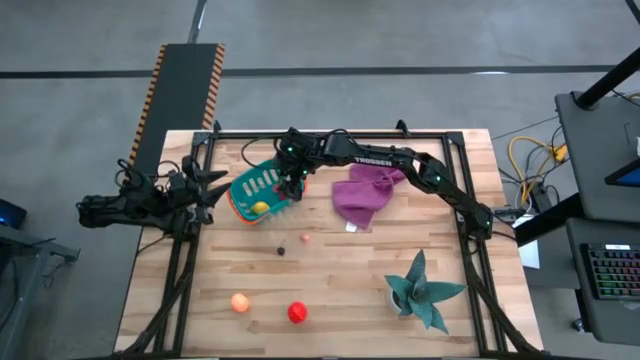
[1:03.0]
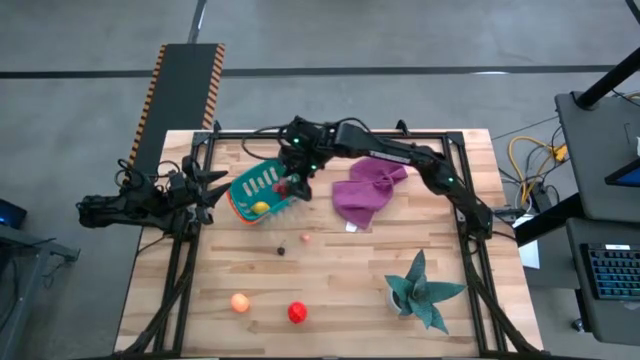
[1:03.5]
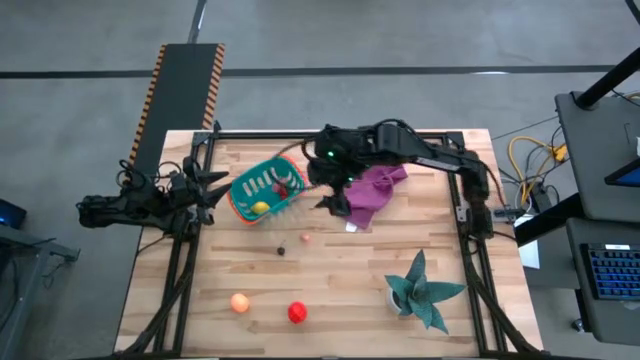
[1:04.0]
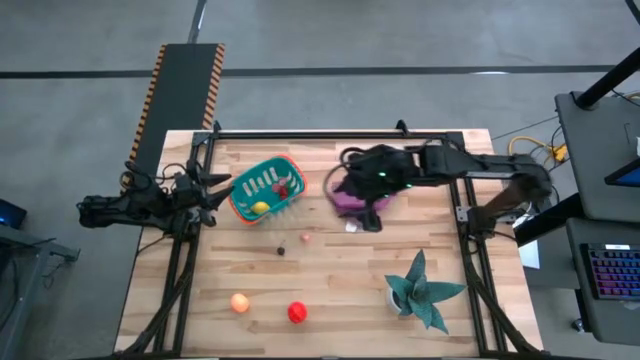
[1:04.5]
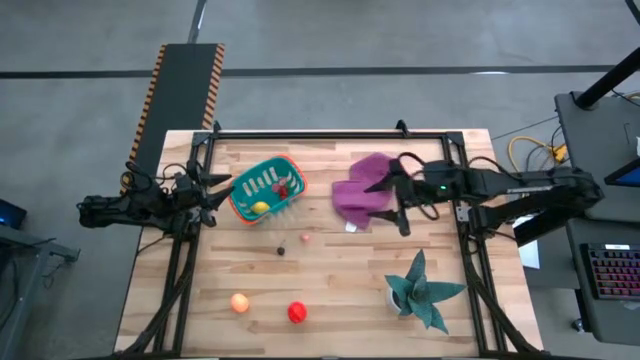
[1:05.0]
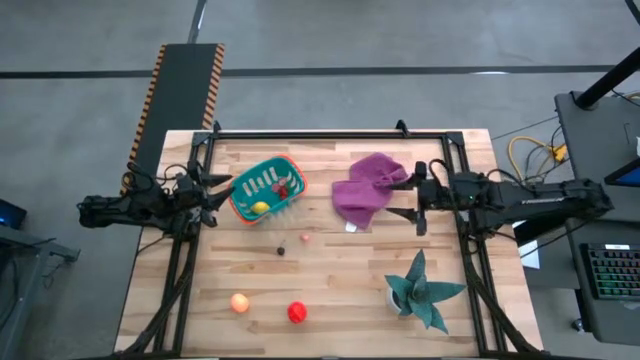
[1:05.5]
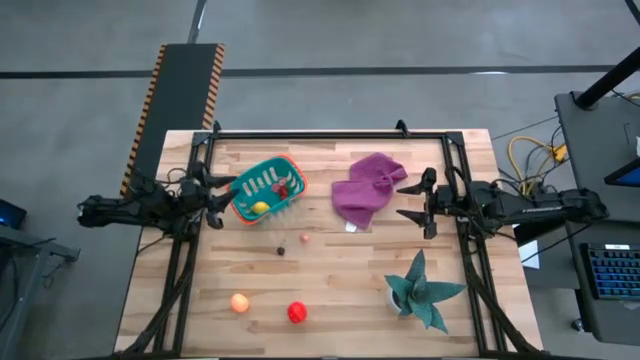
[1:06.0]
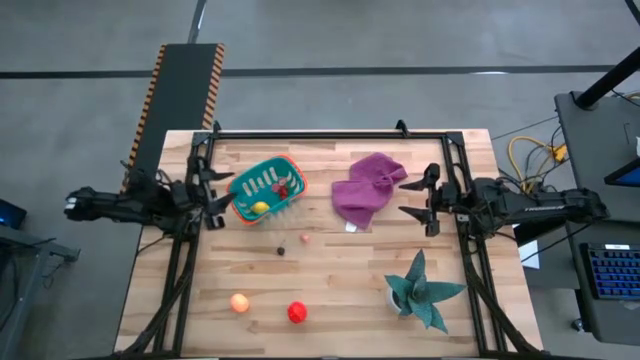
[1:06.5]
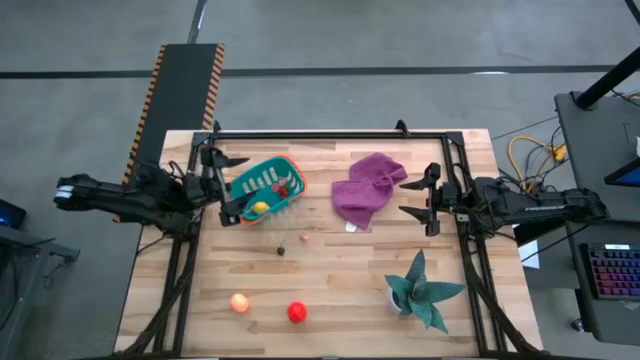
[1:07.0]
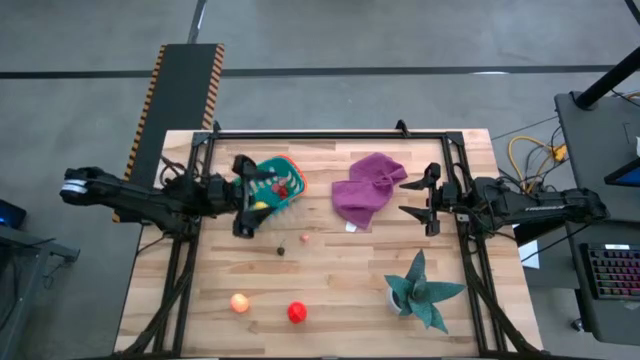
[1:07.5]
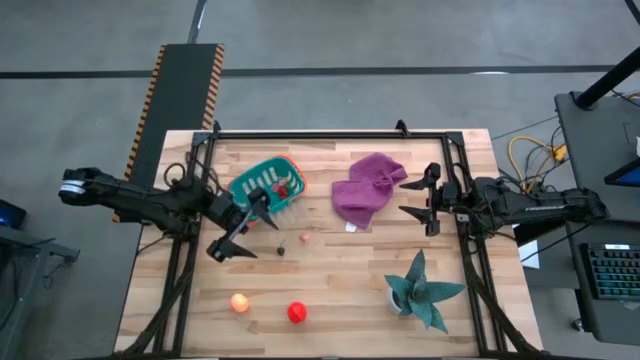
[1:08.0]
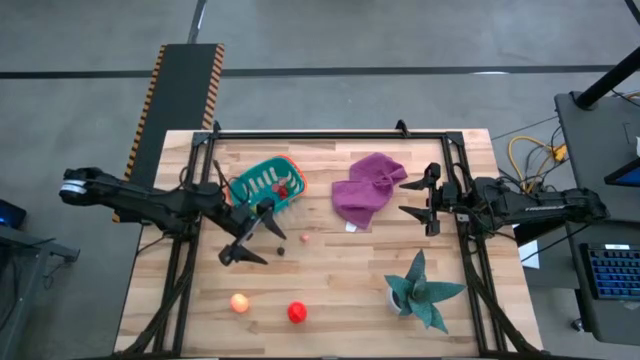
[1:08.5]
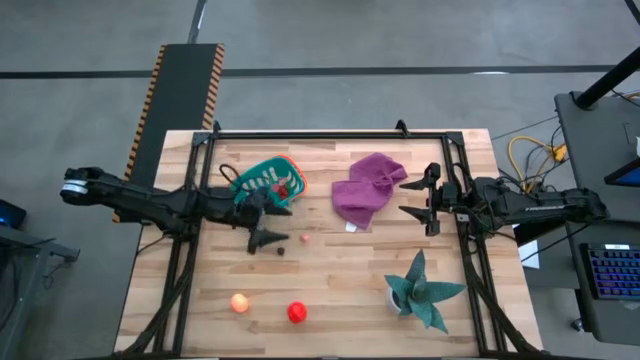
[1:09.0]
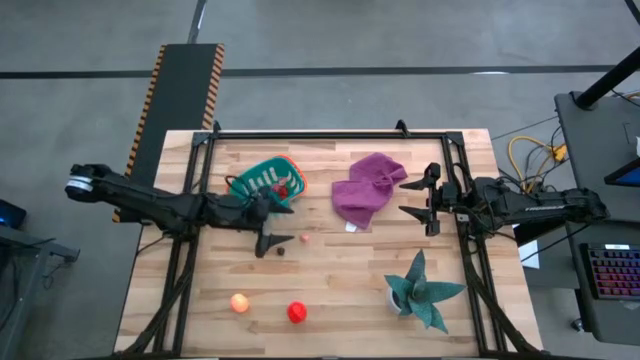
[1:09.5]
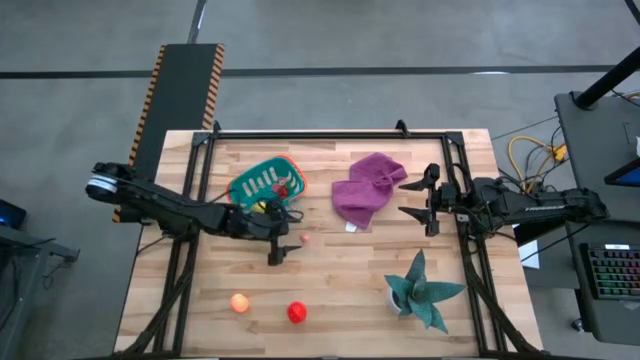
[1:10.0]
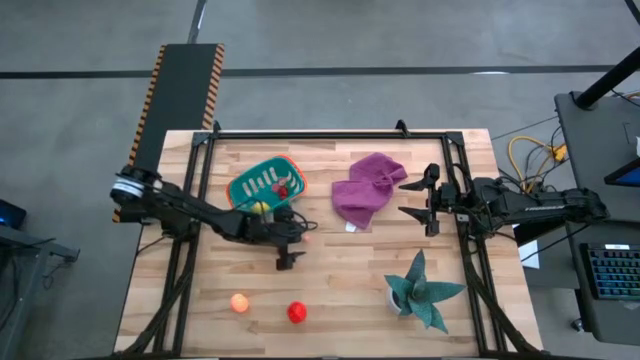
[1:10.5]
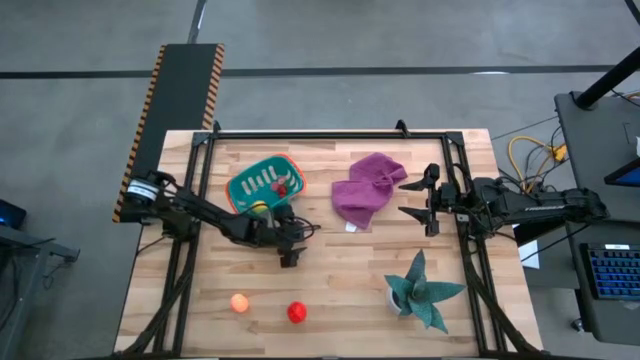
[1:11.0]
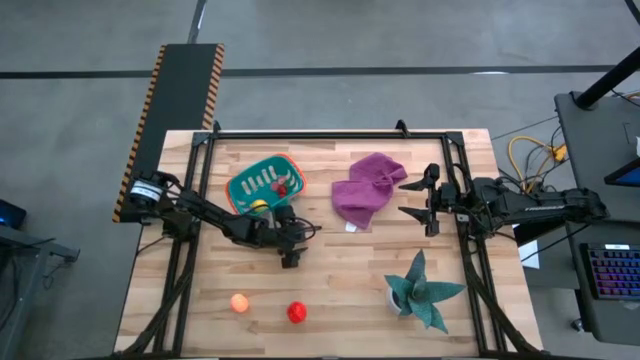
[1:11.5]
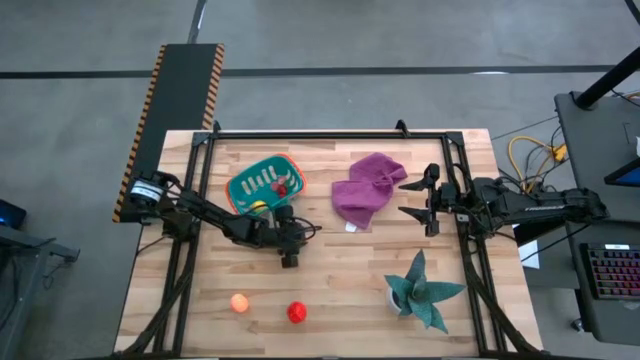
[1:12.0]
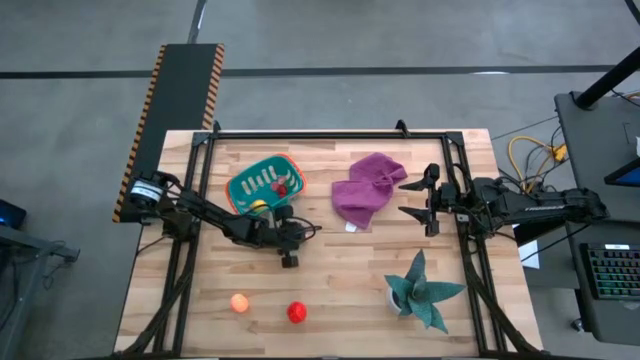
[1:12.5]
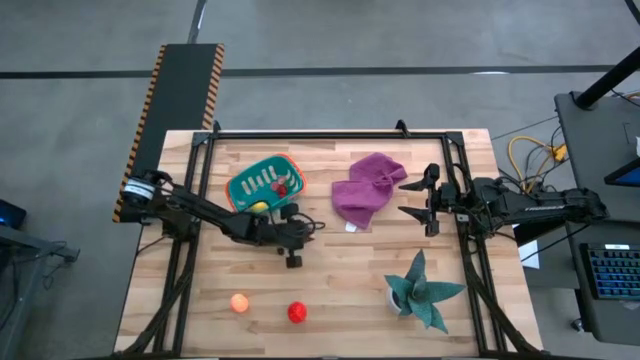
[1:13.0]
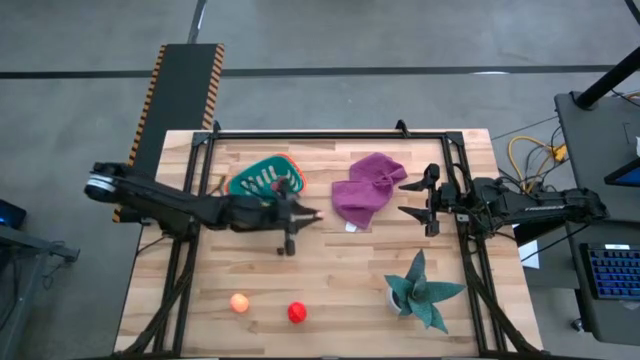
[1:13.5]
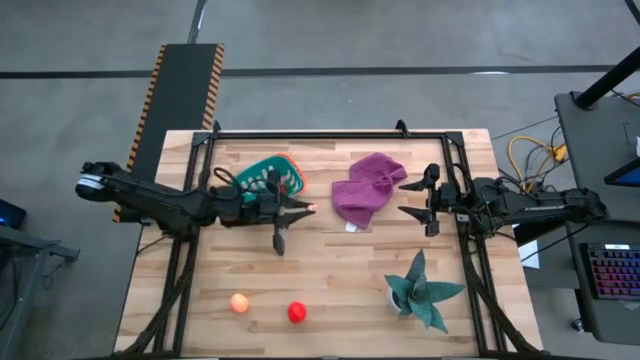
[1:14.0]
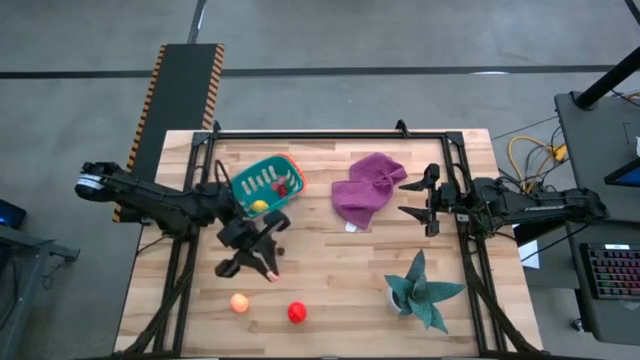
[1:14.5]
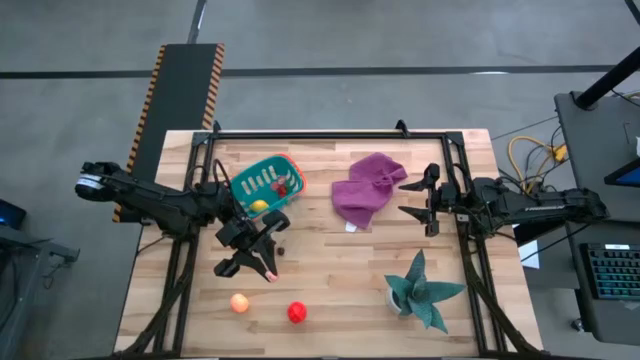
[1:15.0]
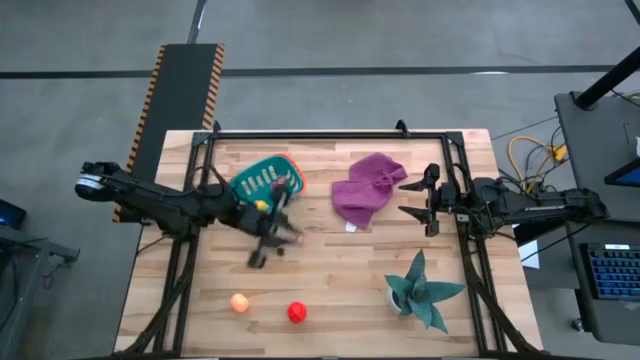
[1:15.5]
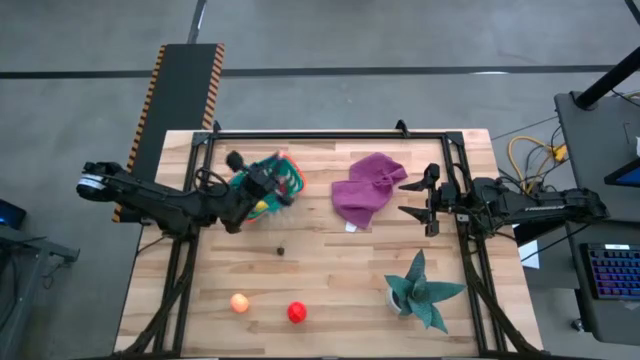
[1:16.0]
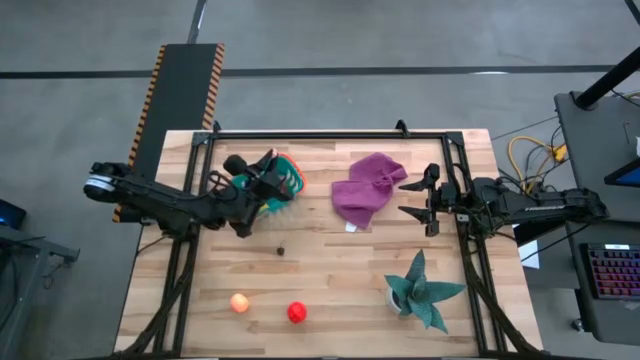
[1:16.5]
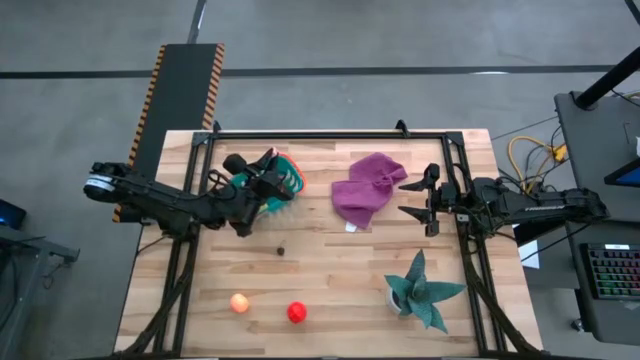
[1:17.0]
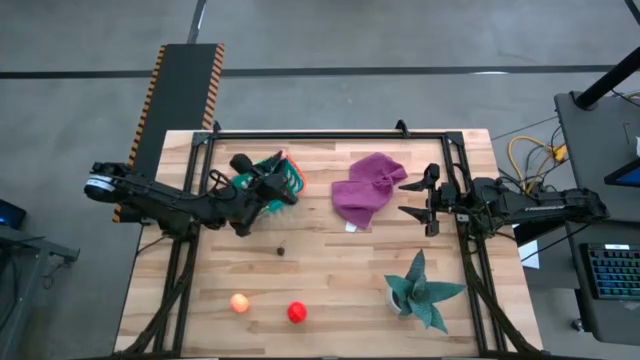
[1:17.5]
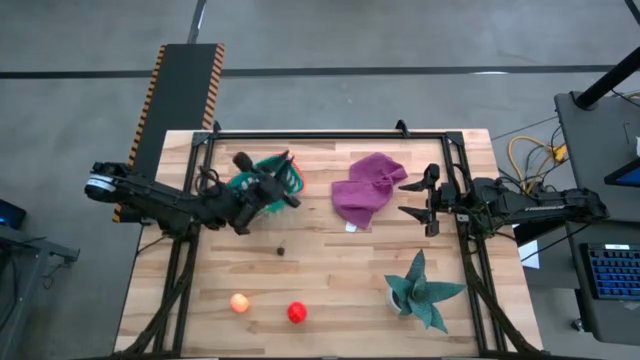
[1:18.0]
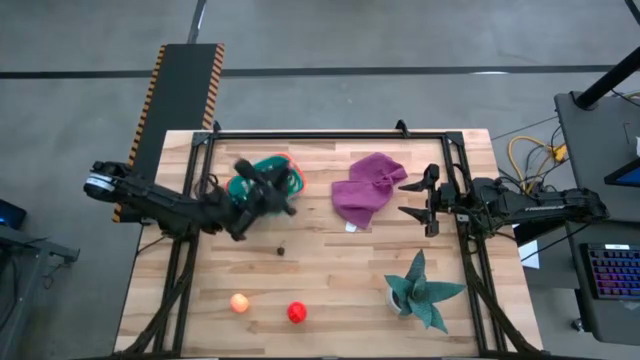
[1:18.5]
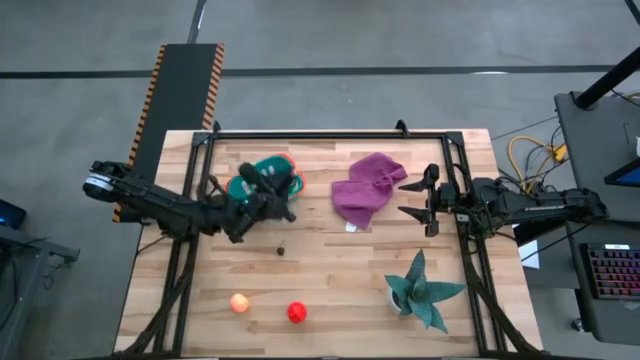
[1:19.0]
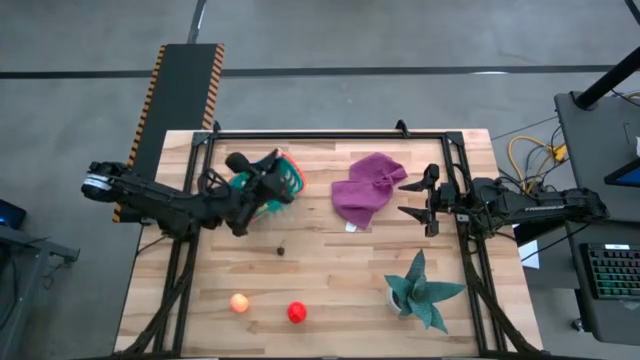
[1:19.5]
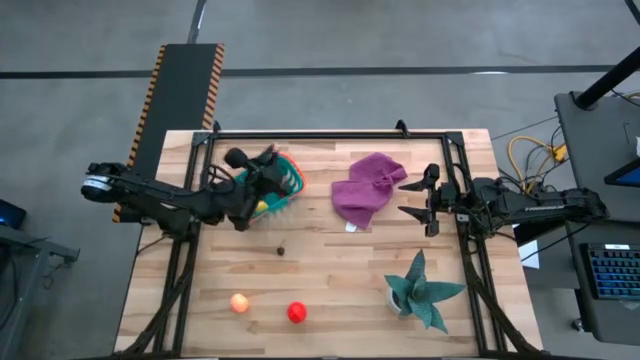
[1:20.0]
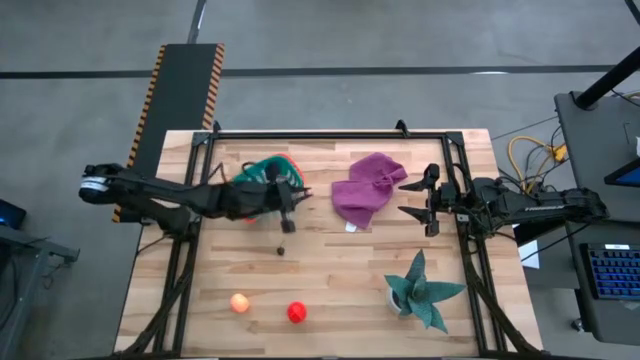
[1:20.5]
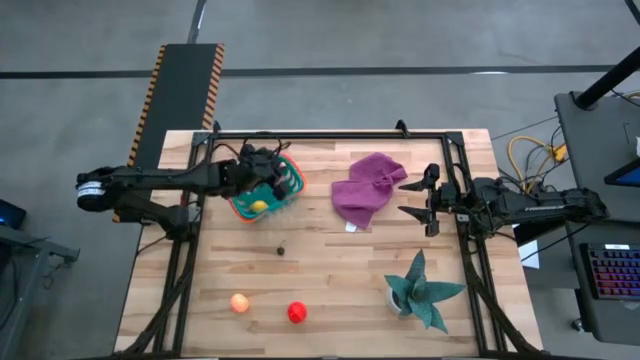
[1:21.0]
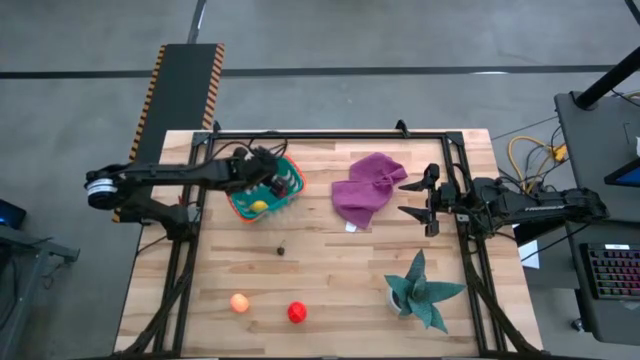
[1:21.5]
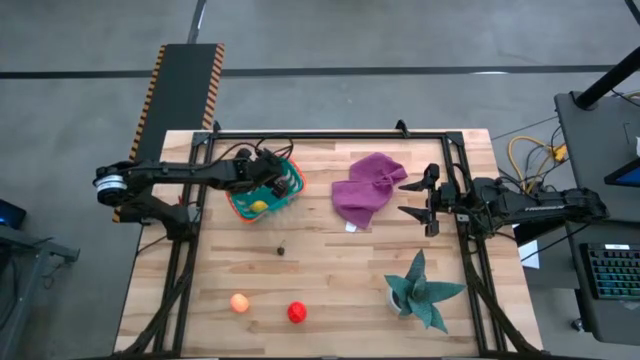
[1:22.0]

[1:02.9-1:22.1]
Task: Pick and placing Produce into tupperware
Put the pink peach into the blue basket

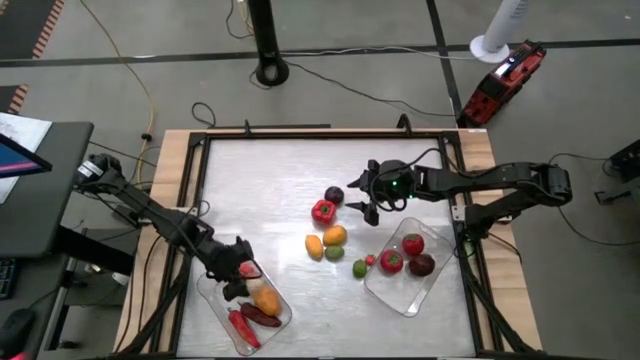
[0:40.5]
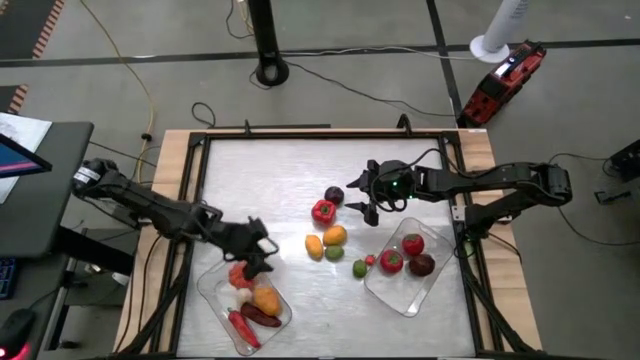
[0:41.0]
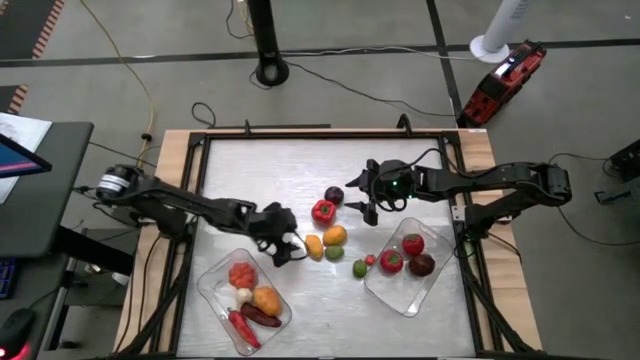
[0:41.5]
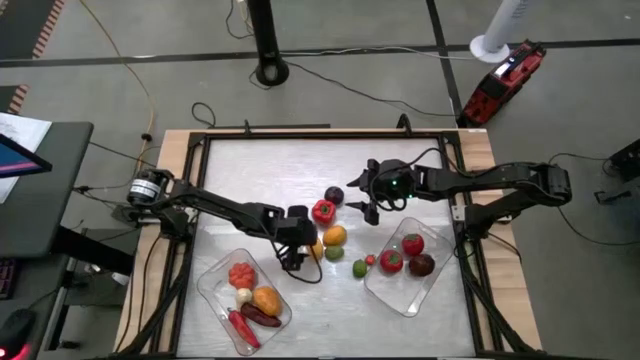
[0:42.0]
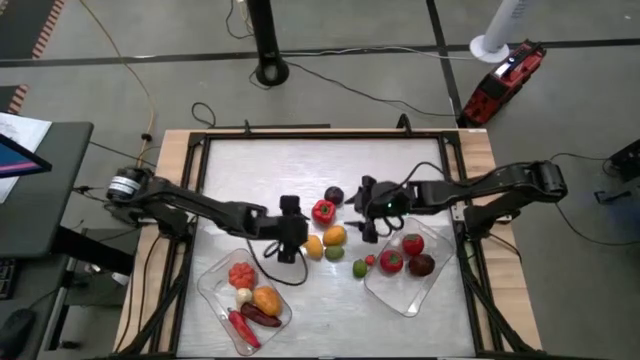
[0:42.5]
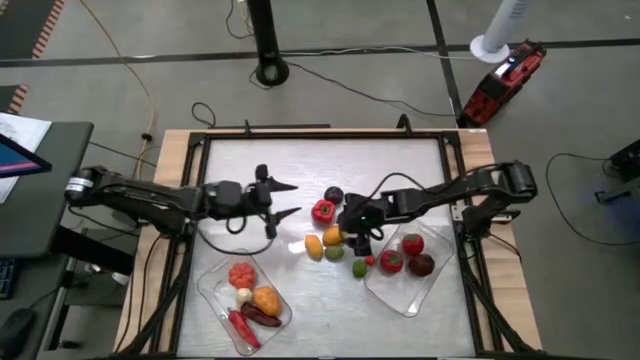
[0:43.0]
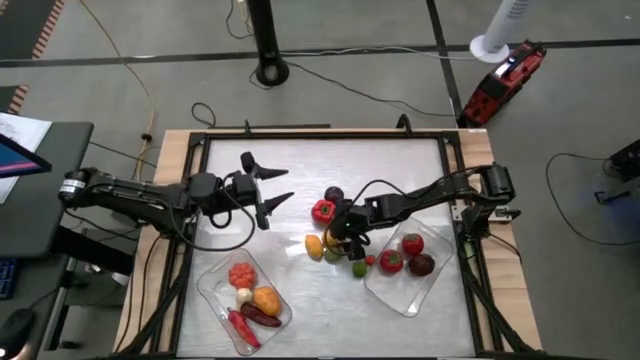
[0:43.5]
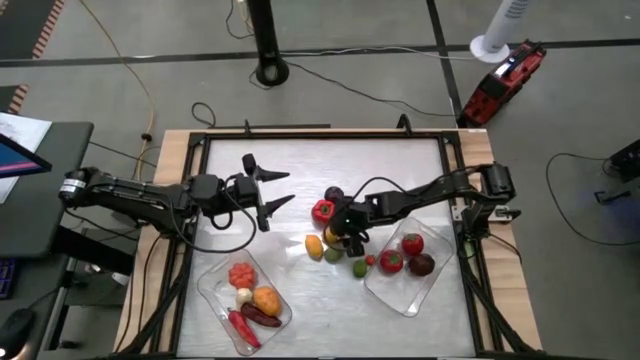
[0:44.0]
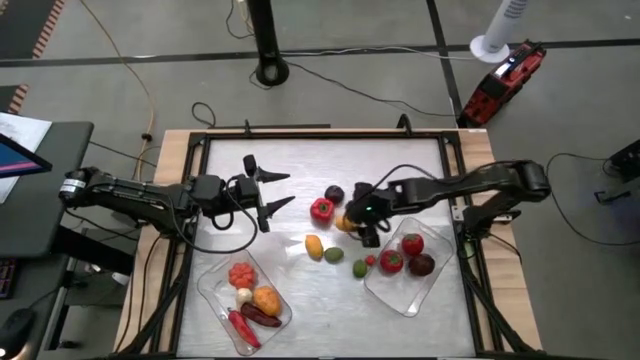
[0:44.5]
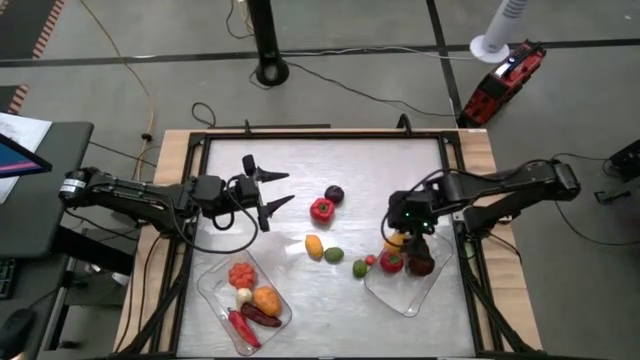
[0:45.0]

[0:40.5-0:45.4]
Task: Sort produce into baskets
Put the yellow lemon into the right transparent bin
